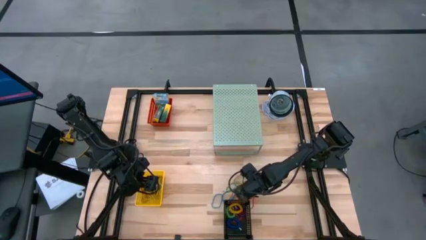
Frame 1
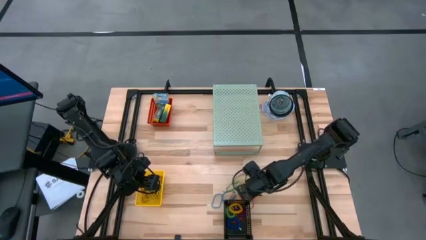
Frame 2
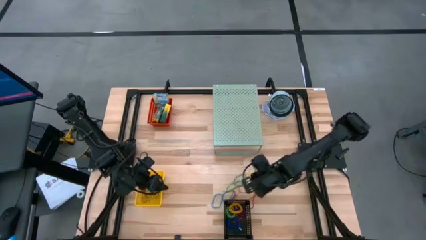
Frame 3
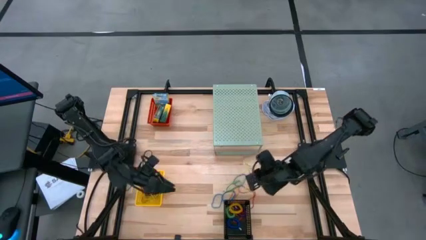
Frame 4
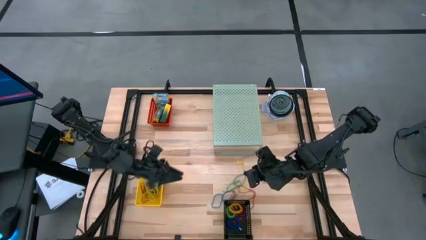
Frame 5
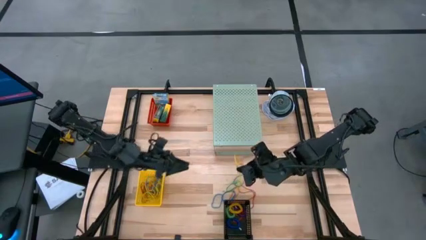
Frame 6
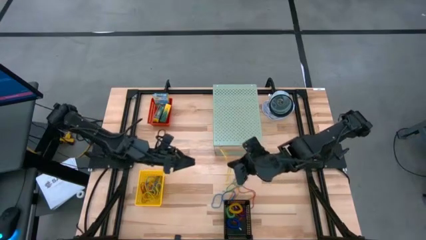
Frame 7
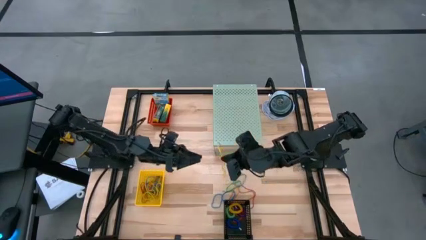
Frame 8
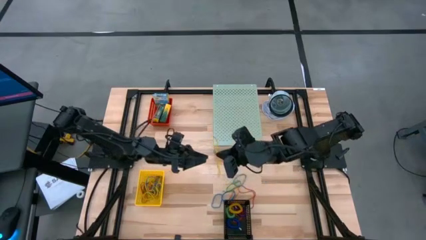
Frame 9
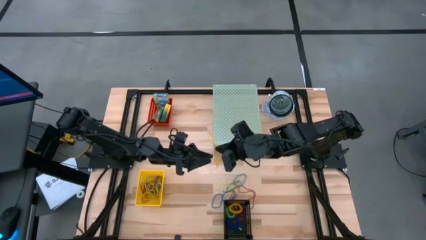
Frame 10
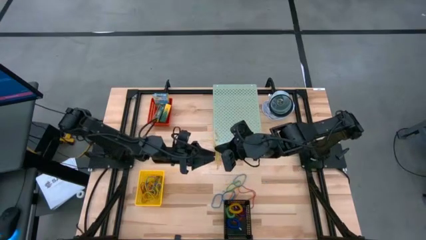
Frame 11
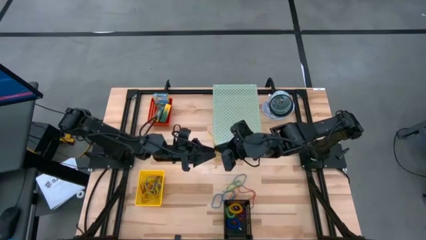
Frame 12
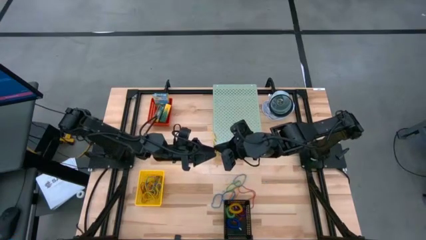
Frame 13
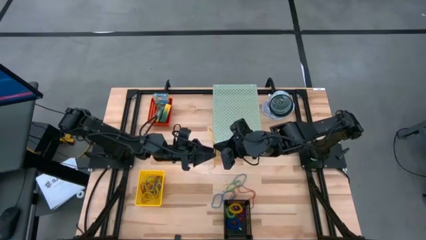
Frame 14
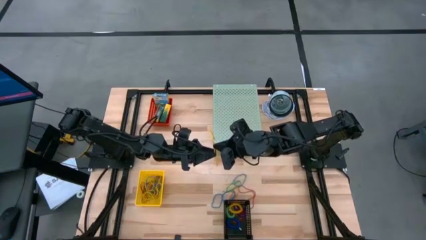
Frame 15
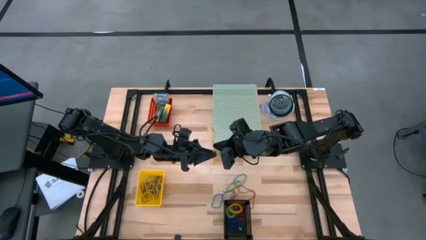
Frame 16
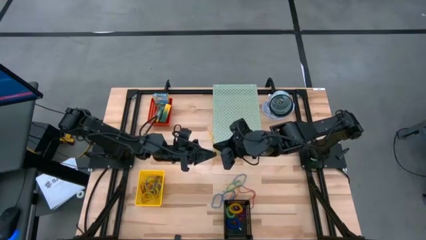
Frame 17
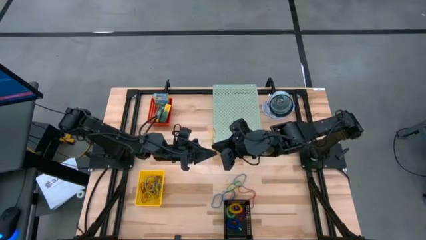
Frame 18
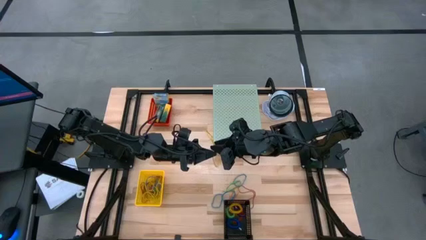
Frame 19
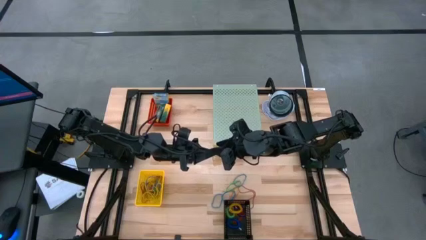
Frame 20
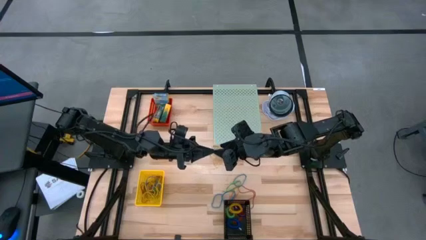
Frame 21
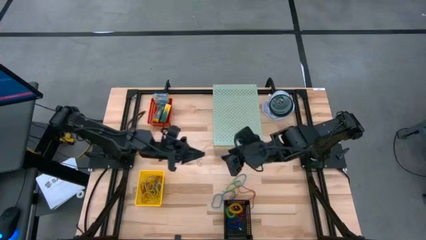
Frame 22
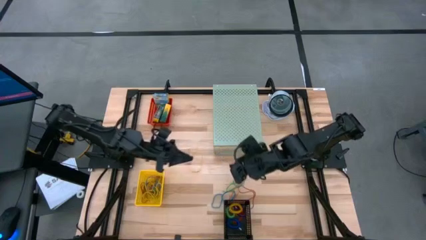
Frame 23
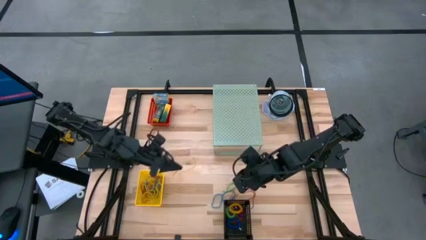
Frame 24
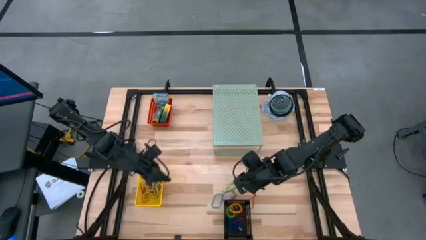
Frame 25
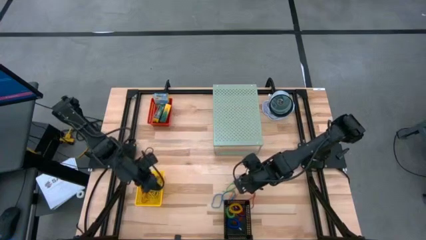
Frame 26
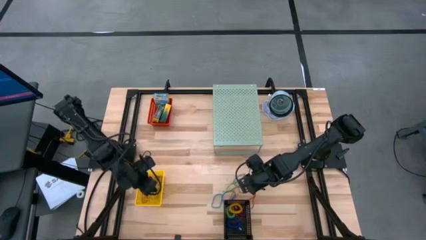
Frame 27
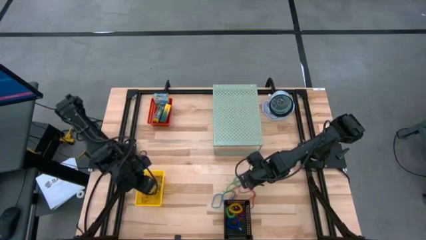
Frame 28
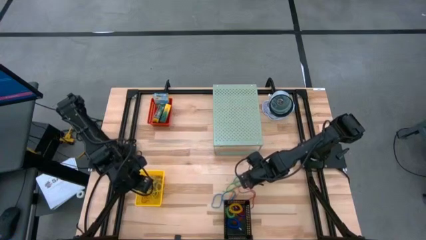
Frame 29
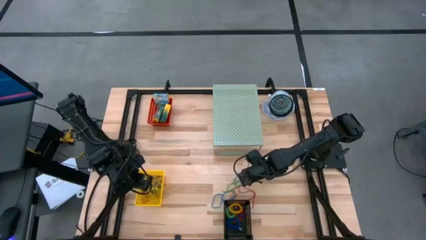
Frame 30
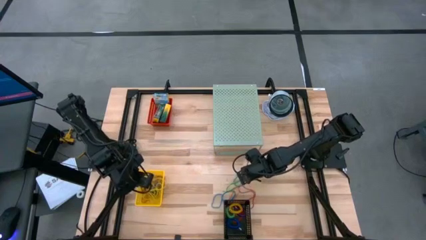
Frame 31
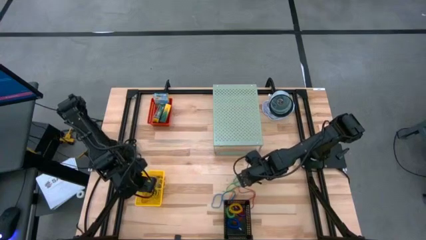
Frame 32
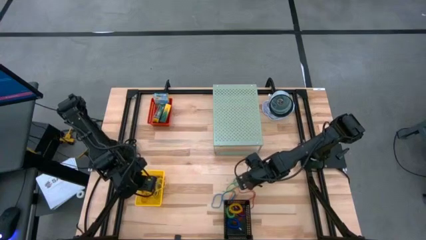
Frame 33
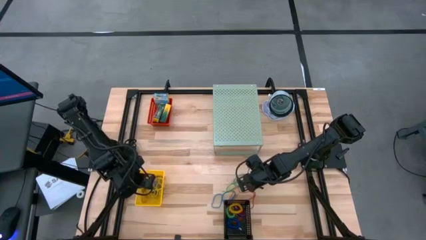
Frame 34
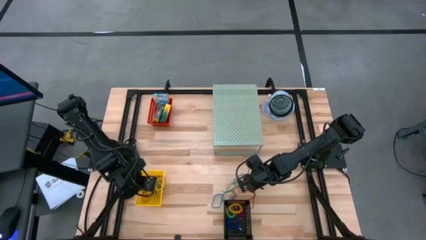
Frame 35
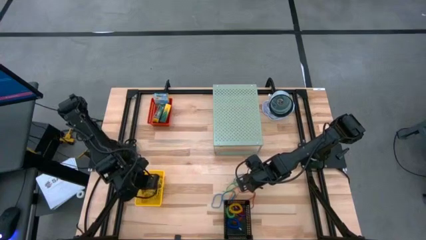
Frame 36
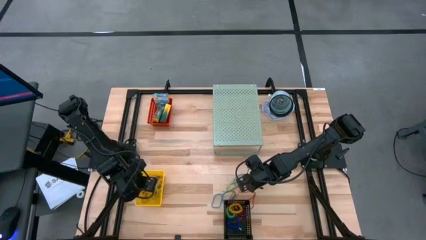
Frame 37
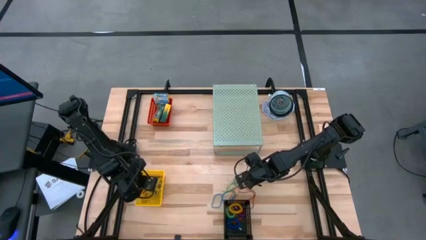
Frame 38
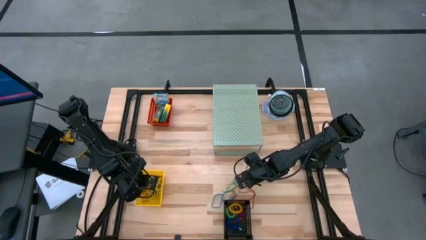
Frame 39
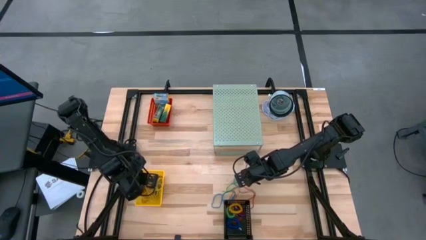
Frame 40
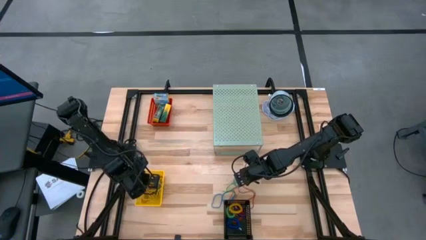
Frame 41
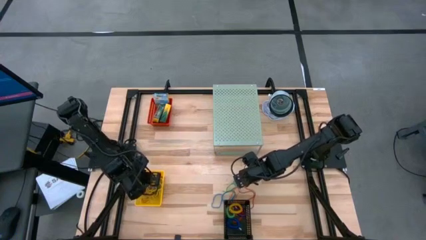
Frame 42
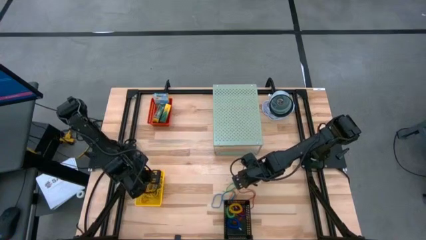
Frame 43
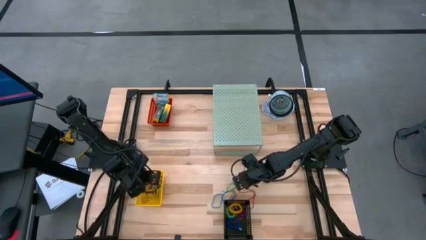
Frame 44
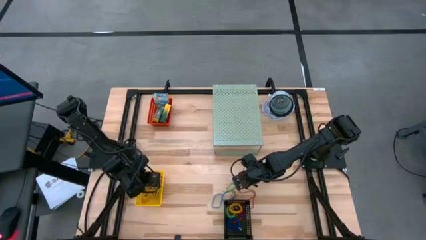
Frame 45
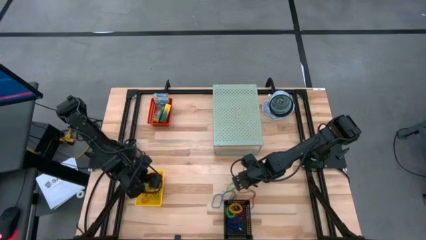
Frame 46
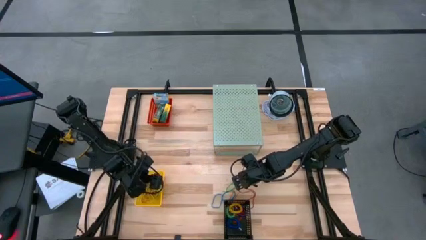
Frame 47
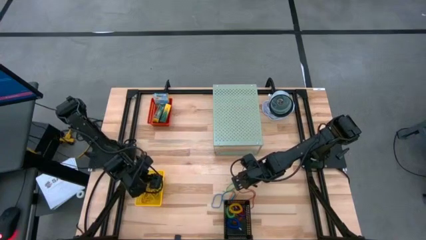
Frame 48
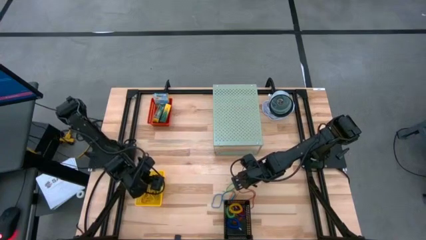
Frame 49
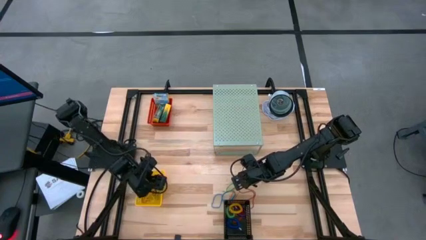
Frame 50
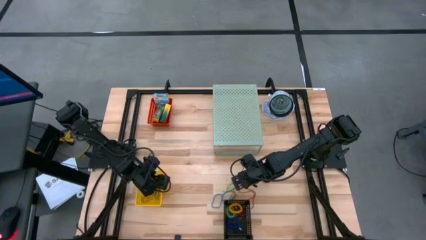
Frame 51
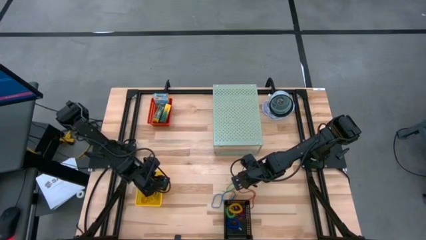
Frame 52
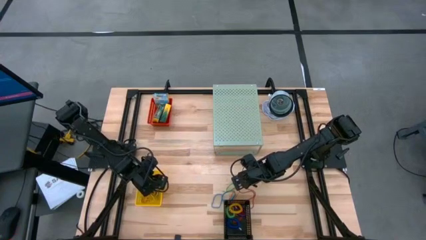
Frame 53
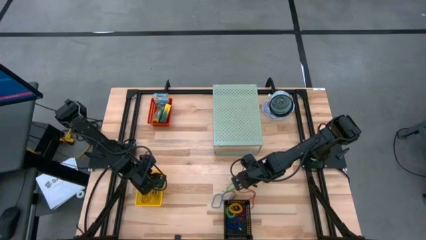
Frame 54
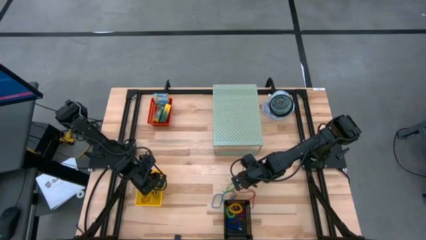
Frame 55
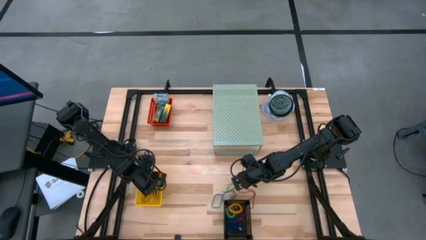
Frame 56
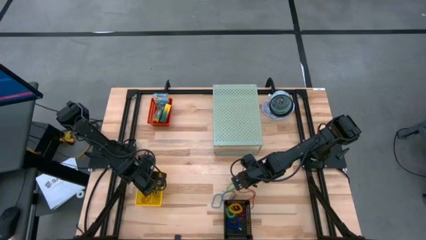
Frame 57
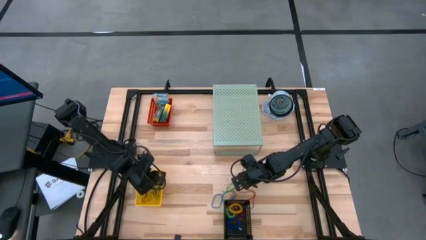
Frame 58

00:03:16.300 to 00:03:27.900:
Task: Pick & Place Office Desk Supplies
Put the yellow rubber band into the yellow bin

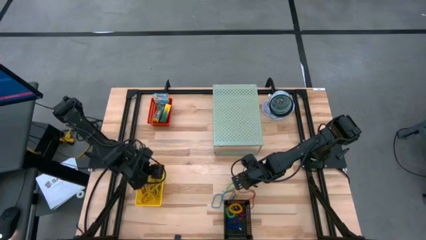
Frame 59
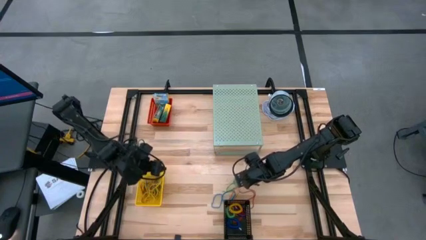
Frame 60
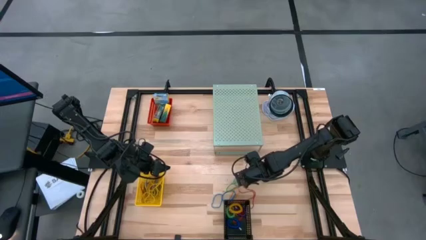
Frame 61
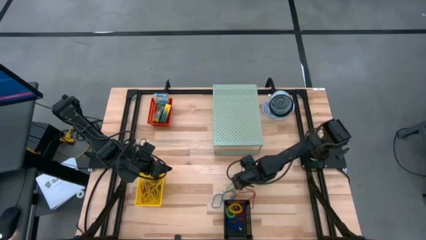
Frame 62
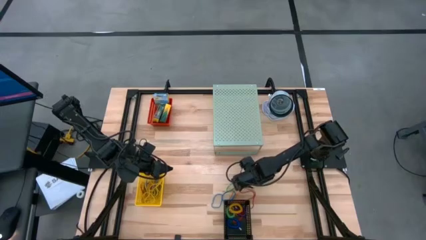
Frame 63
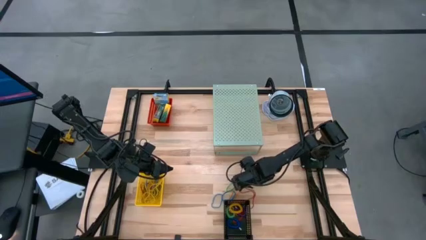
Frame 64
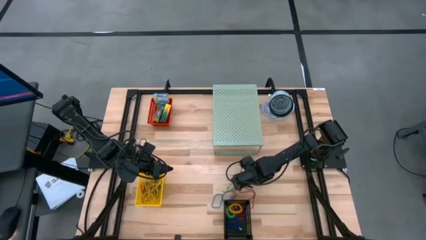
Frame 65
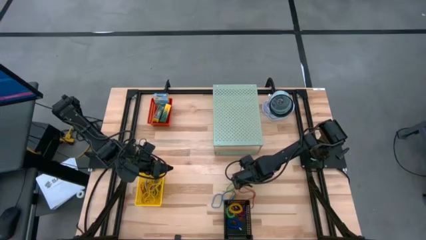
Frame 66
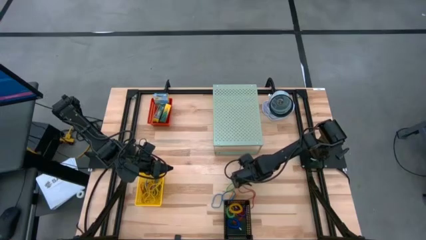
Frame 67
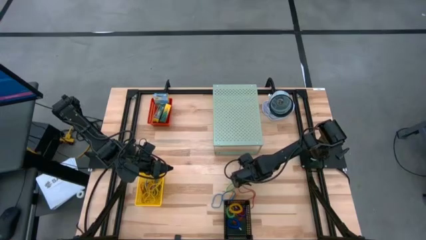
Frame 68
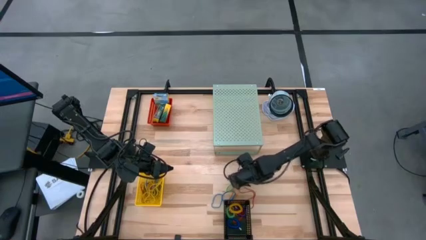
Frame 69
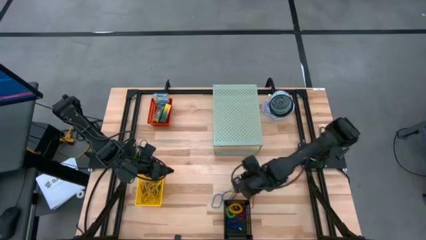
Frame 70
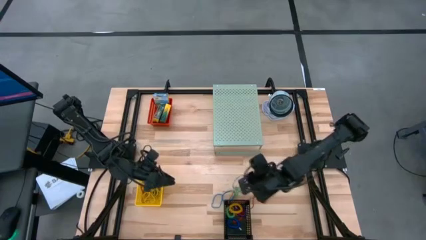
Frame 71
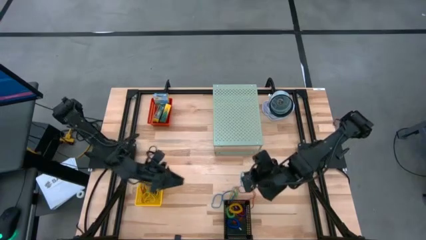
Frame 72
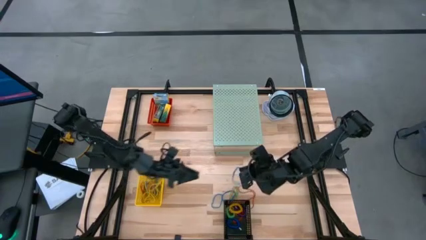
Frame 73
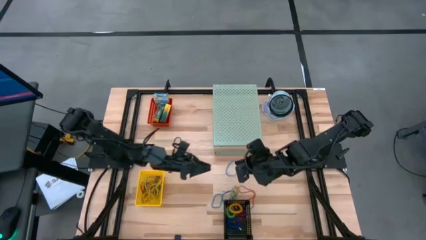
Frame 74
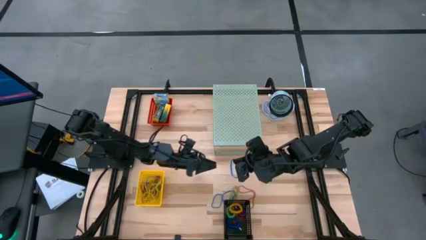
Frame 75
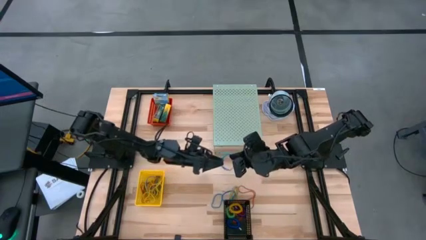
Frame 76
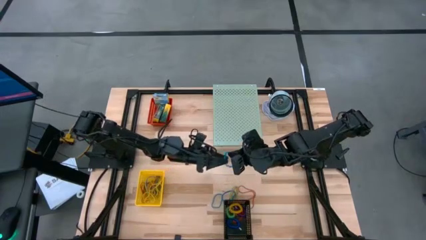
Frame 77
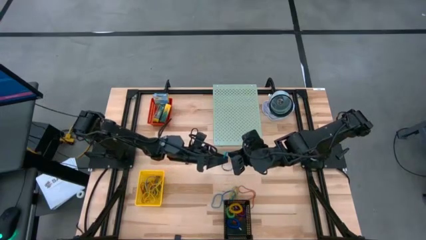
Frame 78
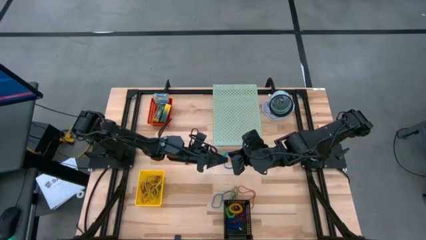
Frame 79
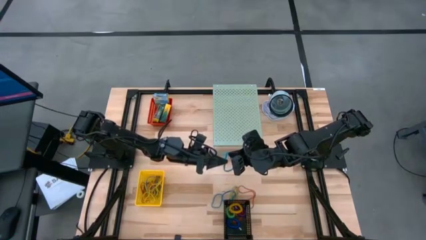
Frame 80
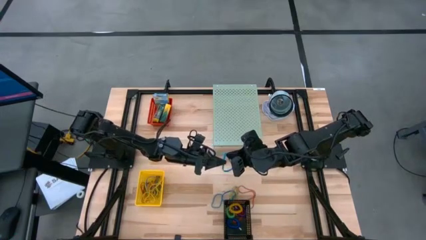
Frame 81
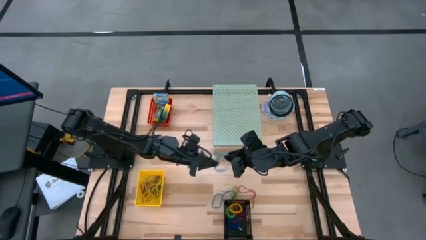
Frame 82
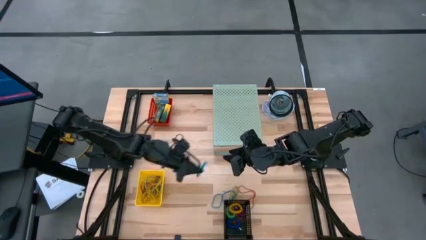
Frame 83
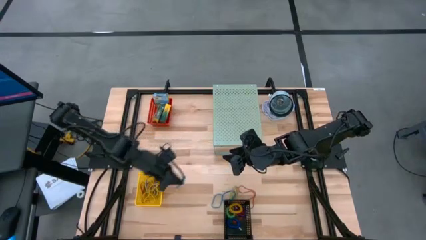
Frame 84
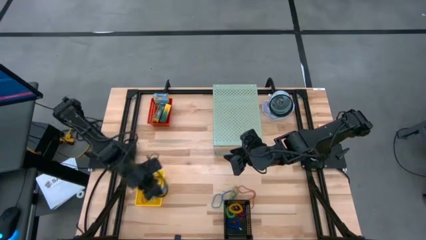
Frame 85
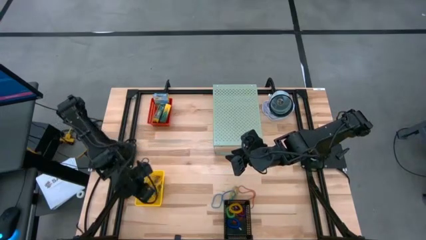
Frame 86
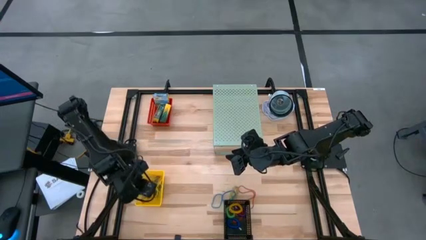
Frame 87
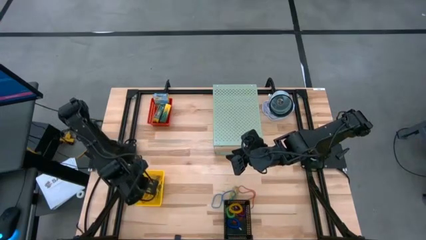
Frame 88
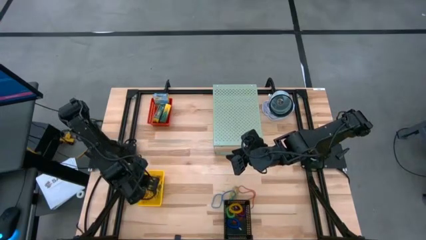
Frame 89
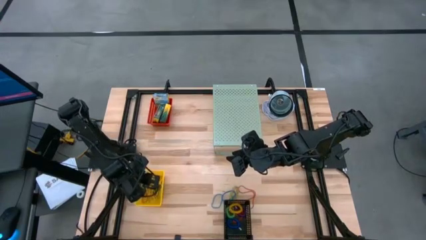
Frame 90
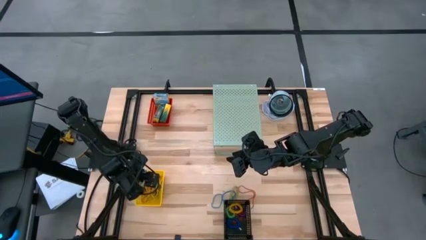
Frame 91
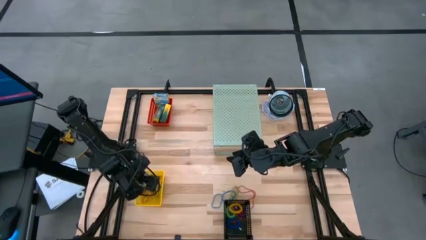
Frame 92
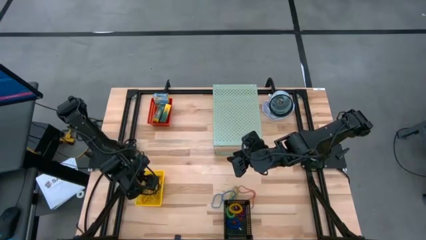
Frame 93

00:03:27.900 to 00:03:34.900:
Put the blue rubber band into the yellow bin
